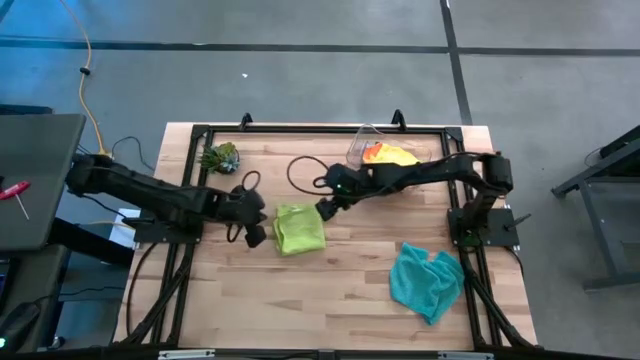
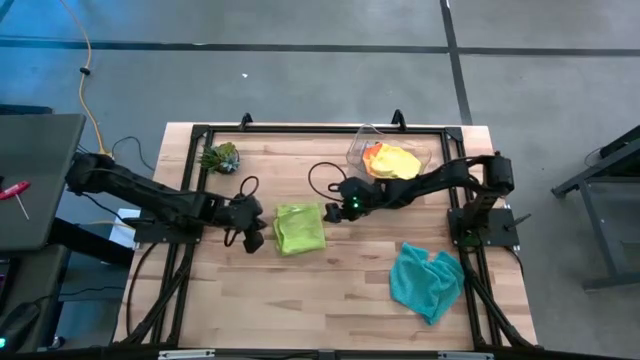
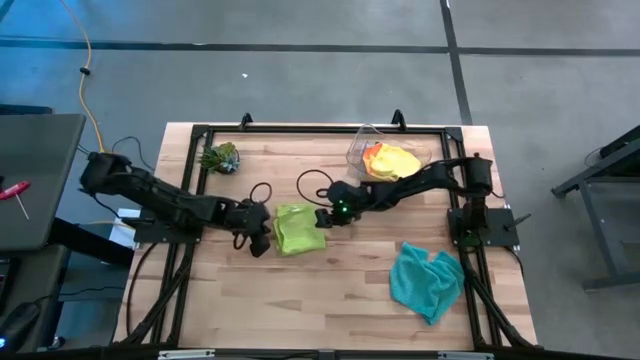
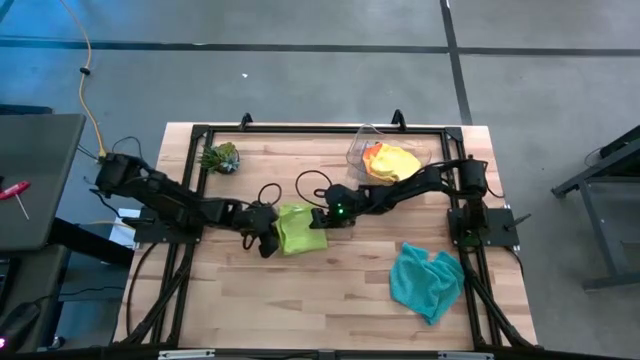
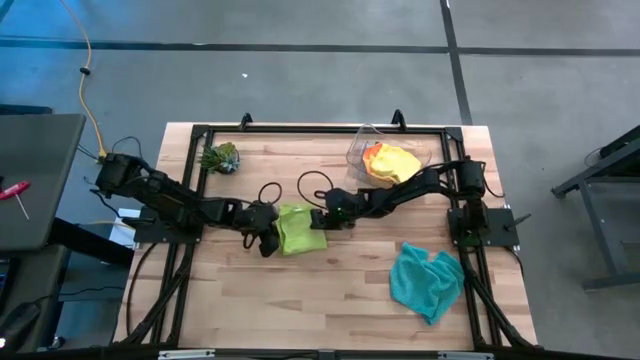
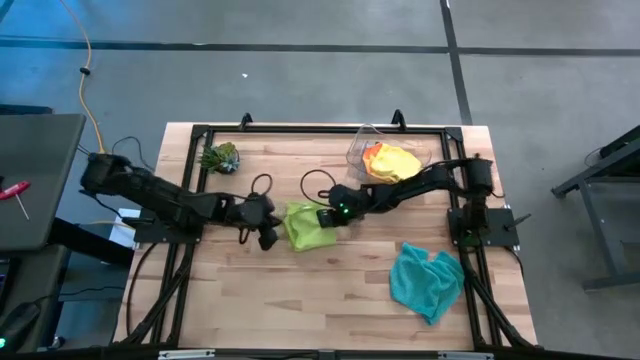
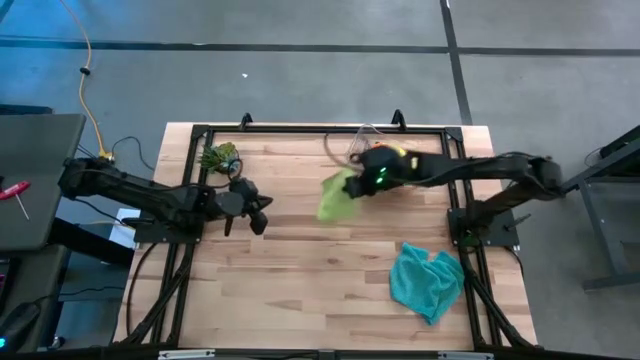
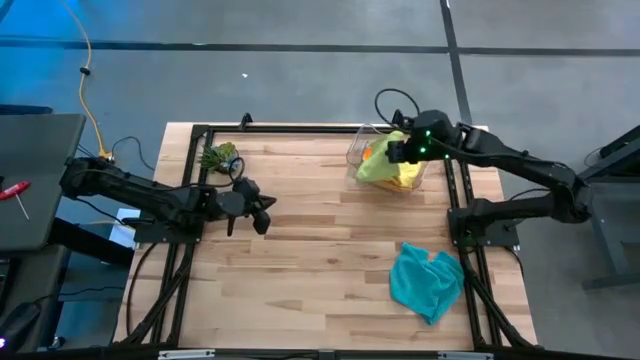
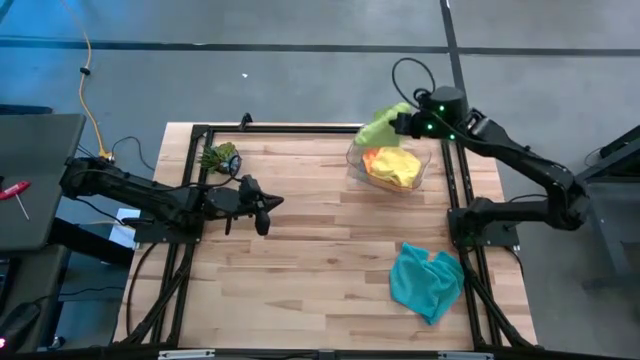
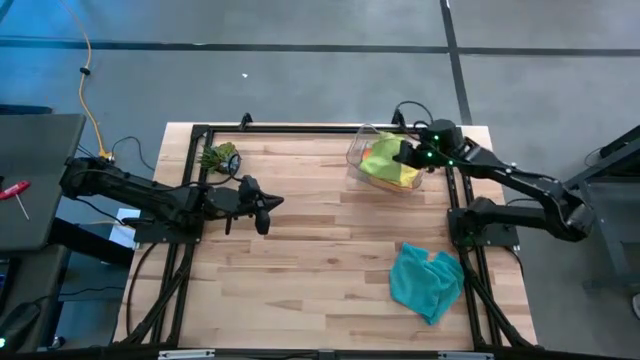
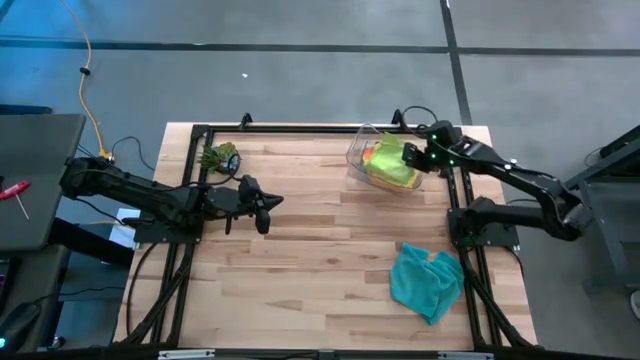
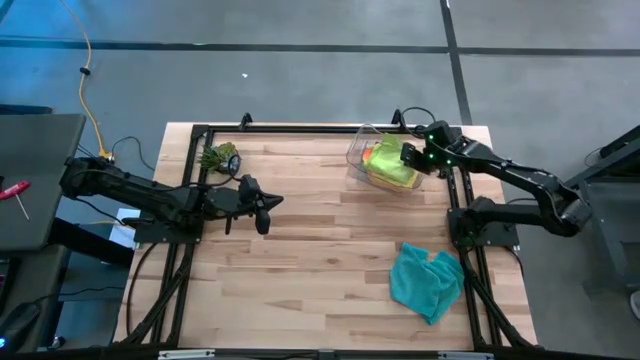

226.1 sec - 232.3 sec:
Task: Fold microfiber towels
Put the green orange microfiber towel into the transparent bin

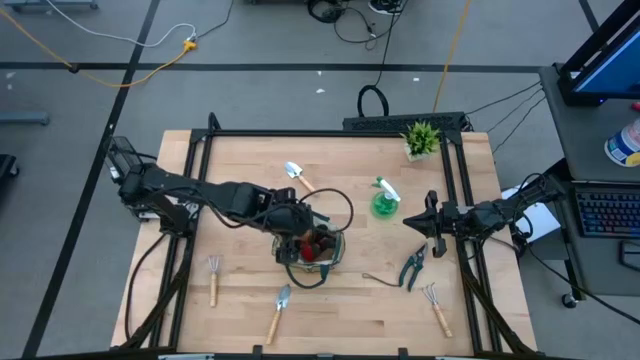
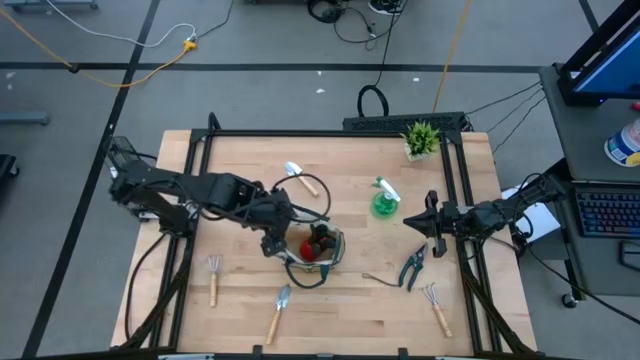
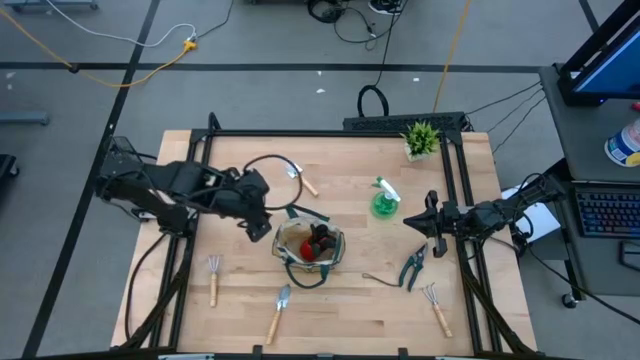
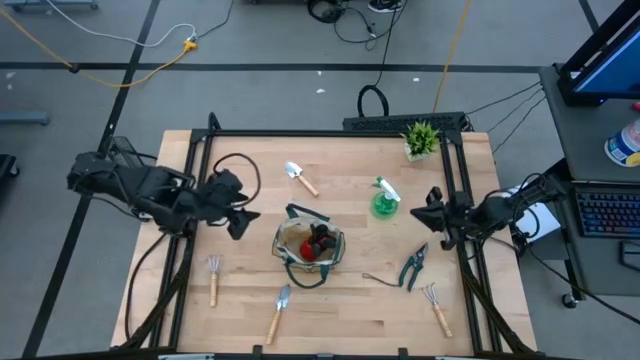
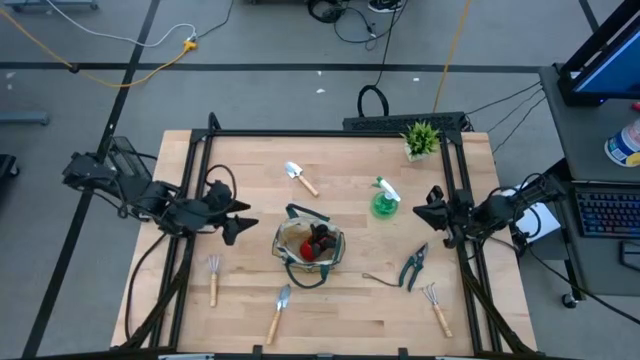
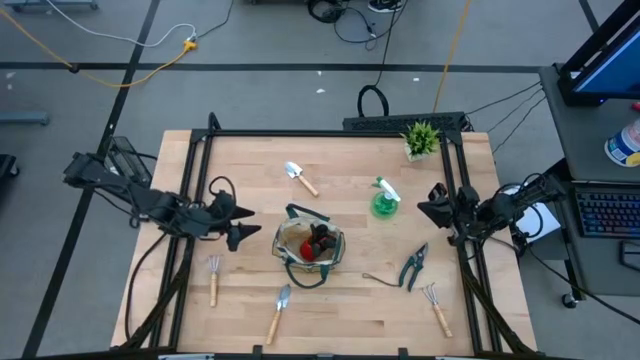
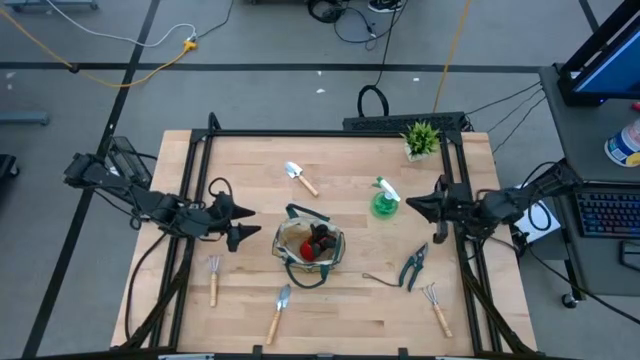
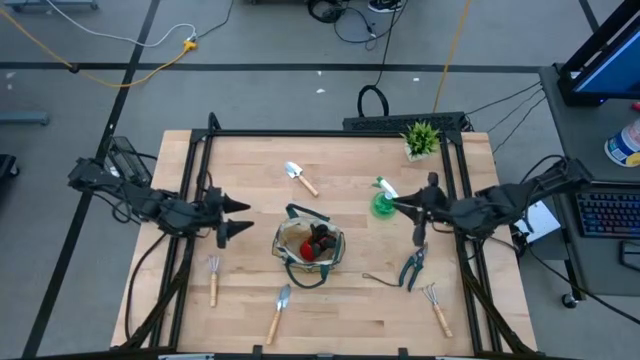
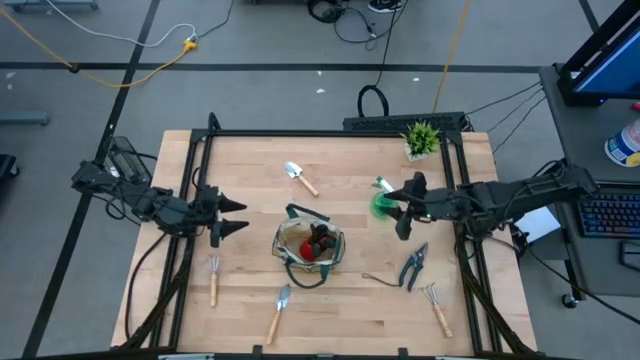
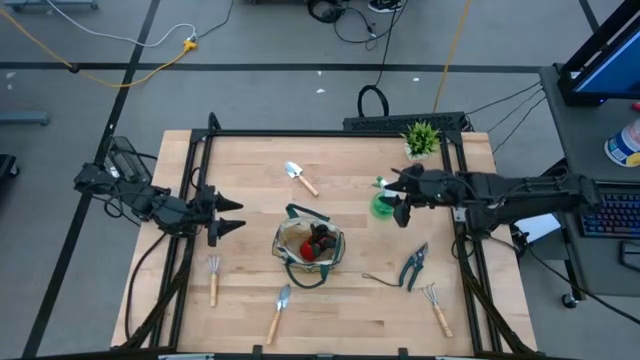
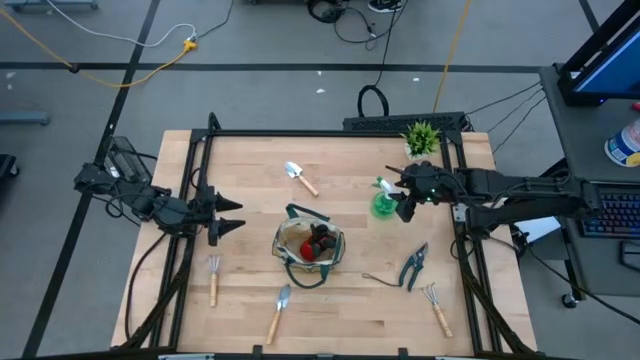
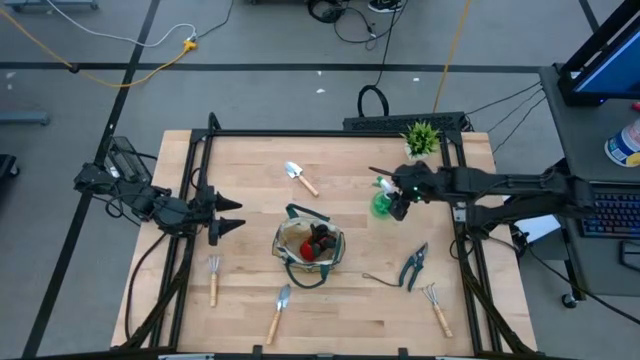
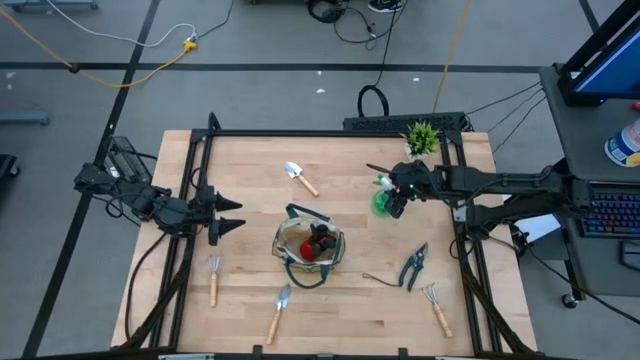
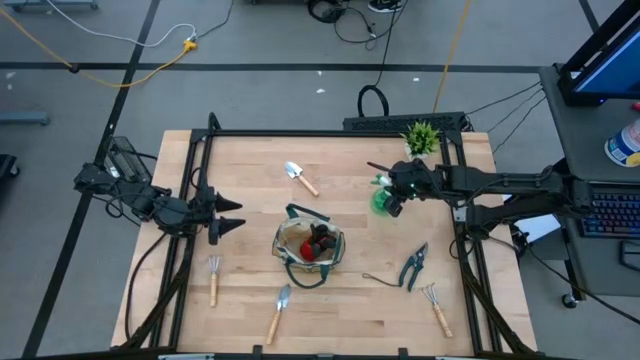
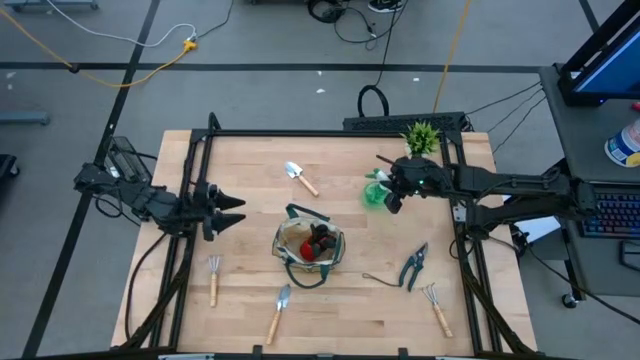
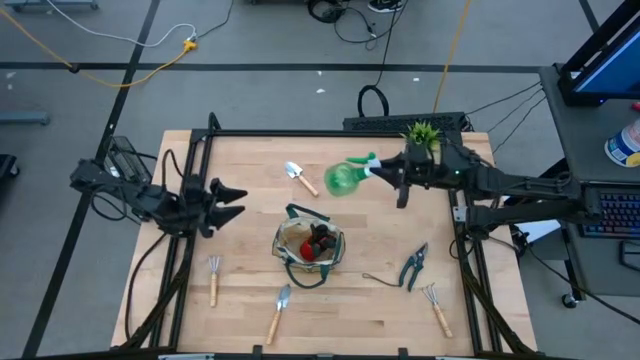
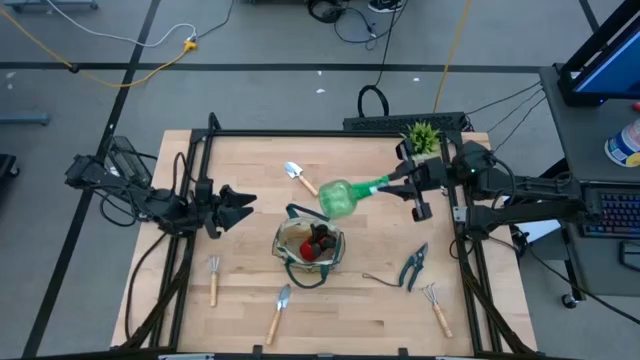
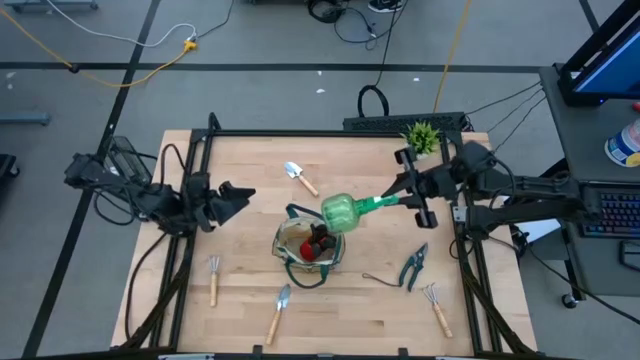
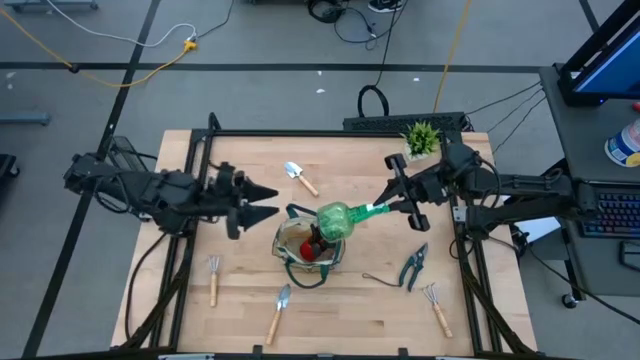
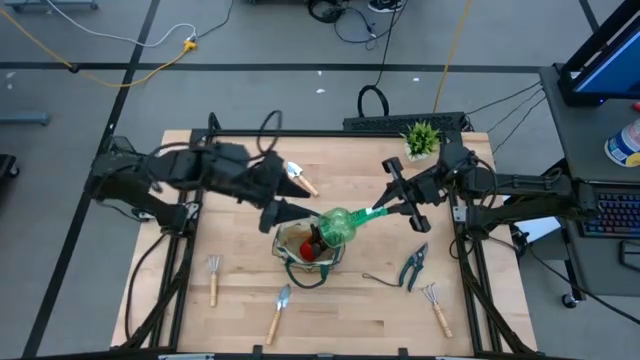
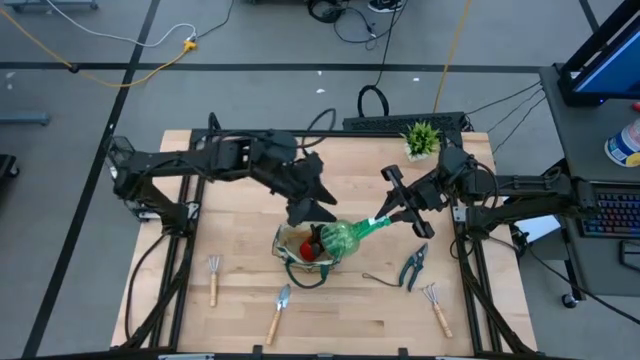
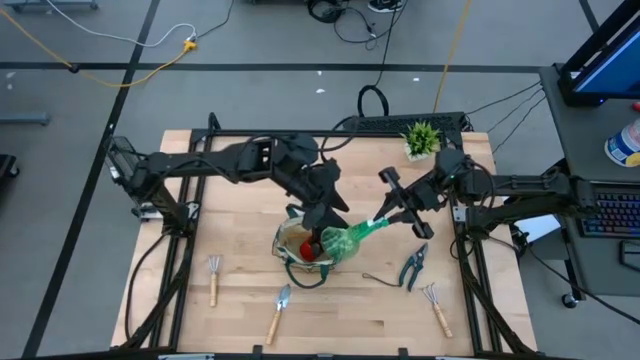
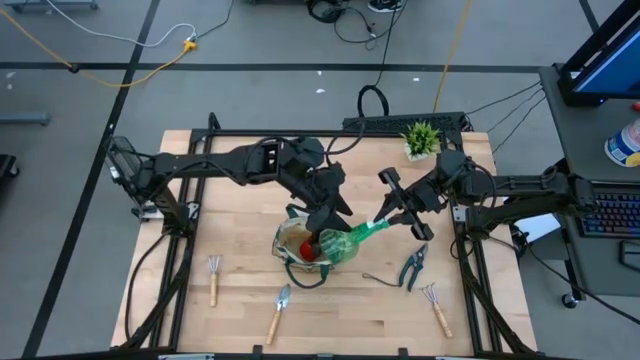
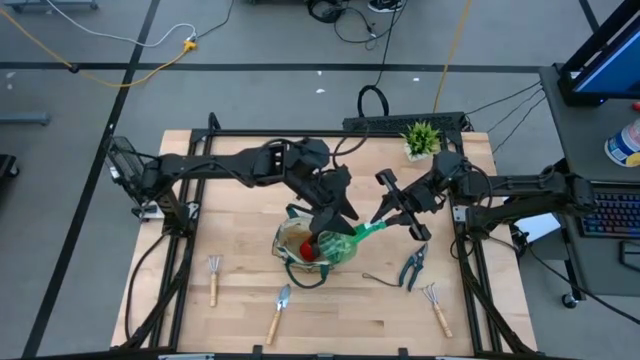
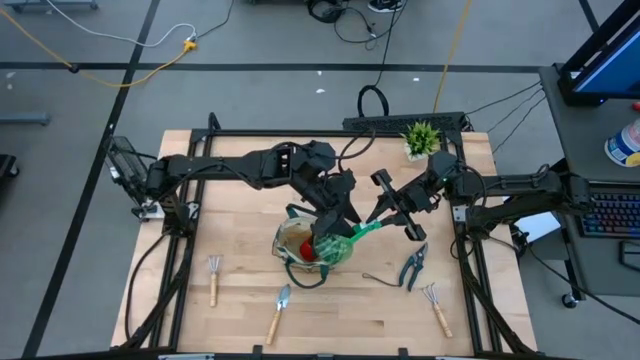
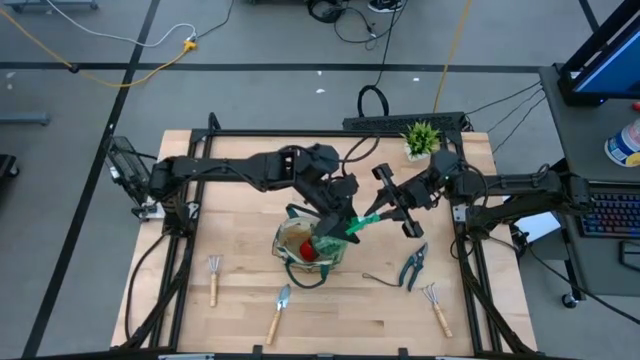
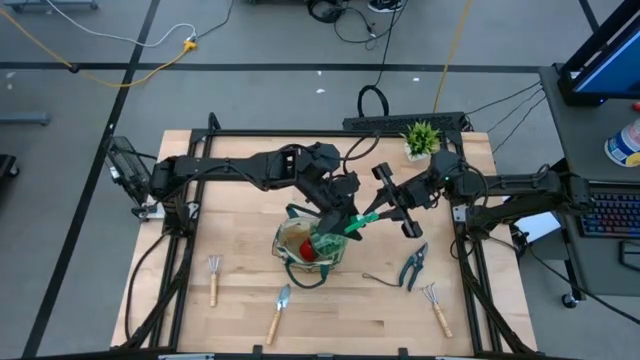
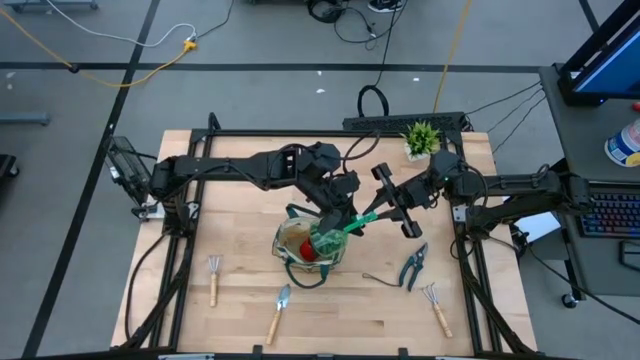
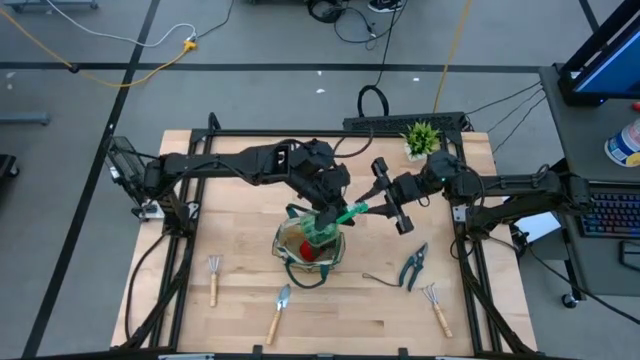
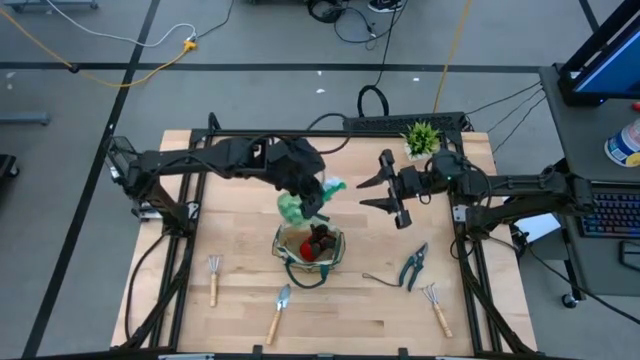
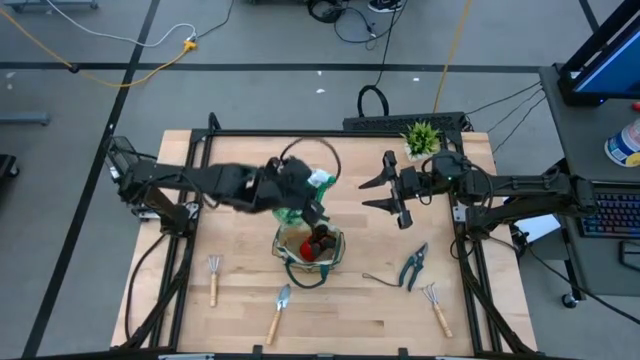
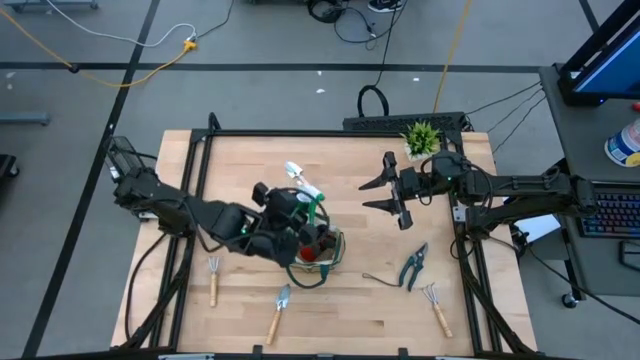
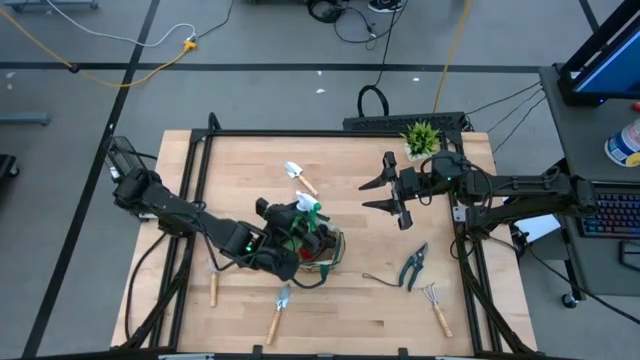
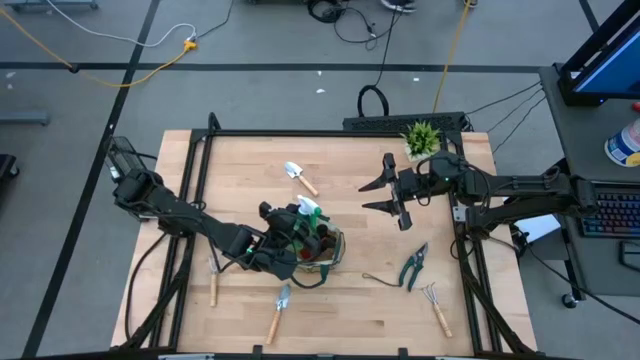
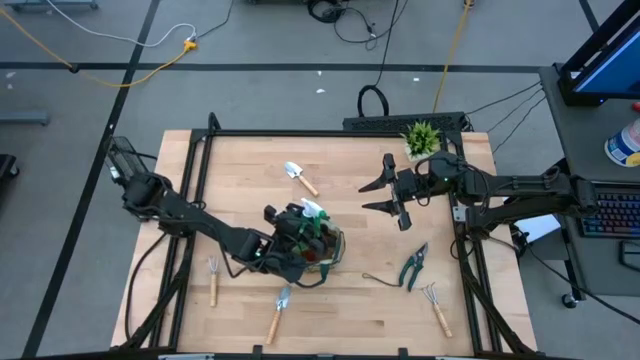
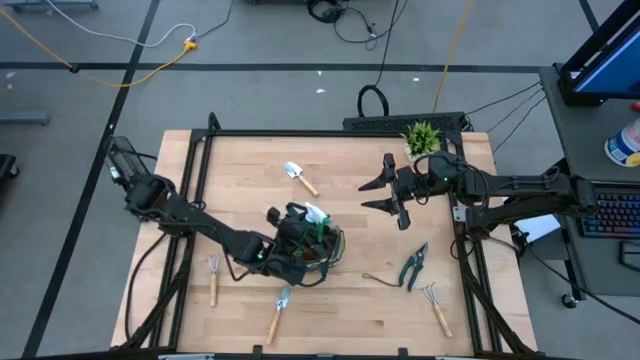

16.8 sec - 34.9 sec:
Task: Pick & Place Garden tools in Gardening bag
Put the spray bottle into the gardening bag
